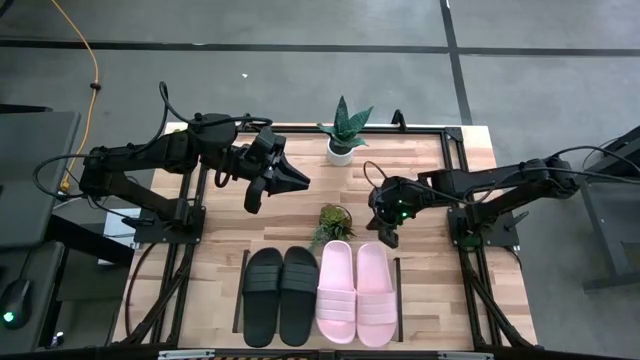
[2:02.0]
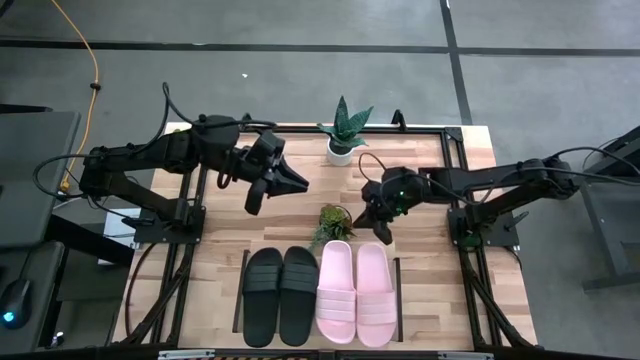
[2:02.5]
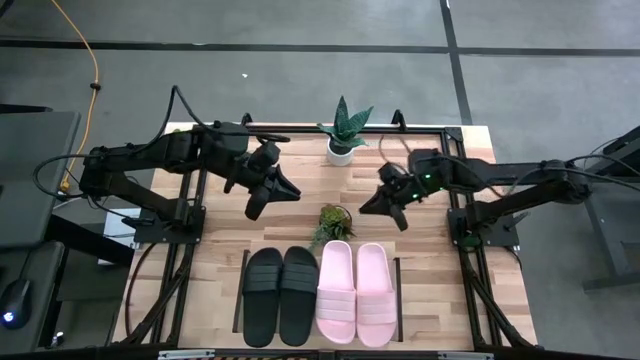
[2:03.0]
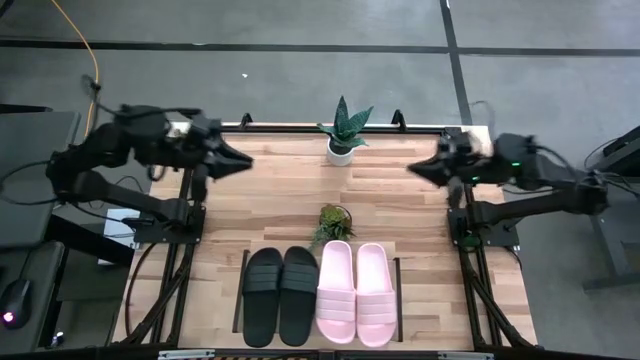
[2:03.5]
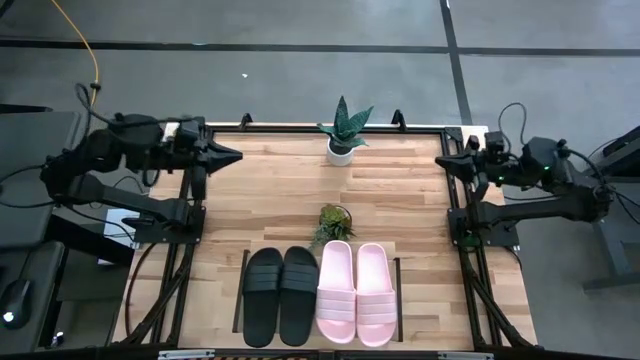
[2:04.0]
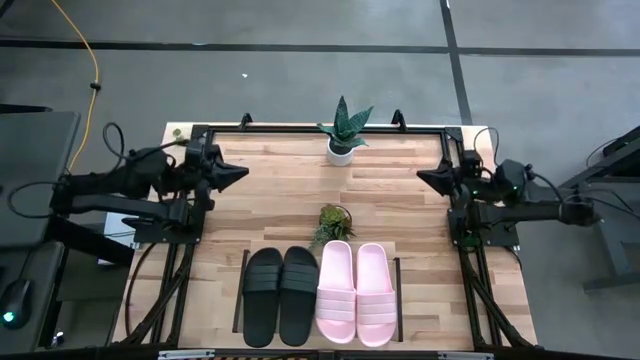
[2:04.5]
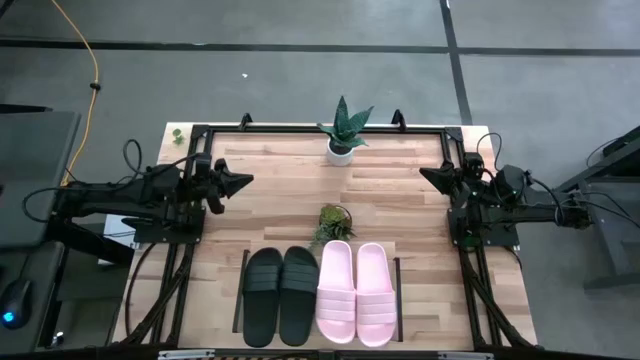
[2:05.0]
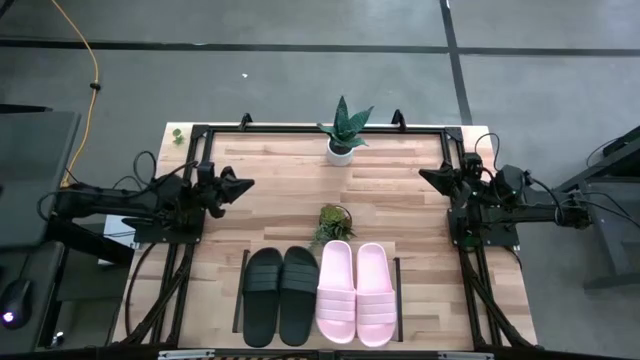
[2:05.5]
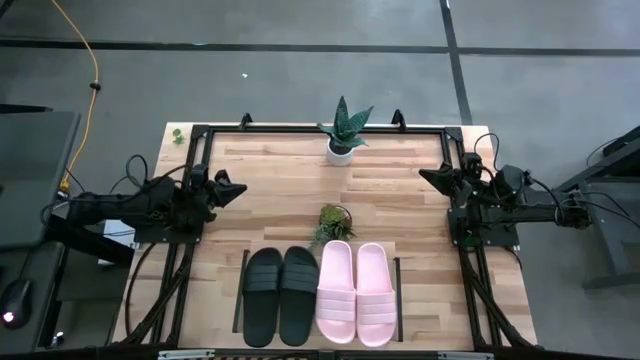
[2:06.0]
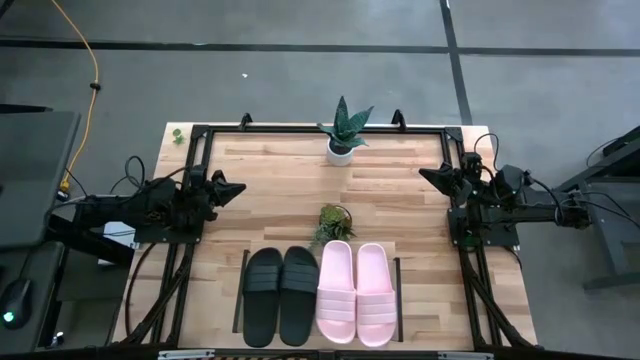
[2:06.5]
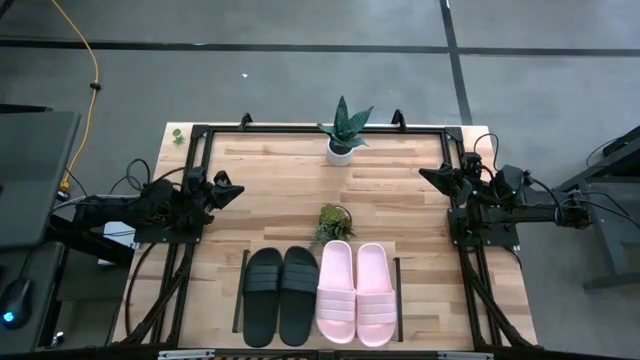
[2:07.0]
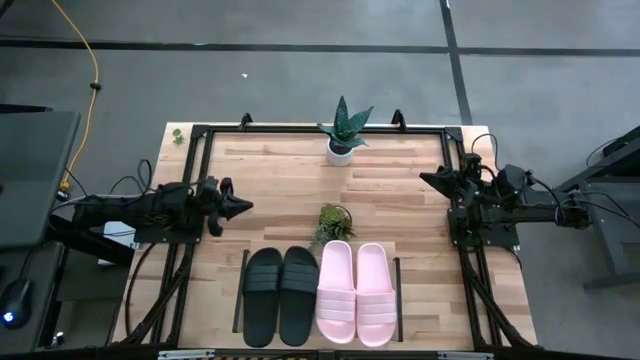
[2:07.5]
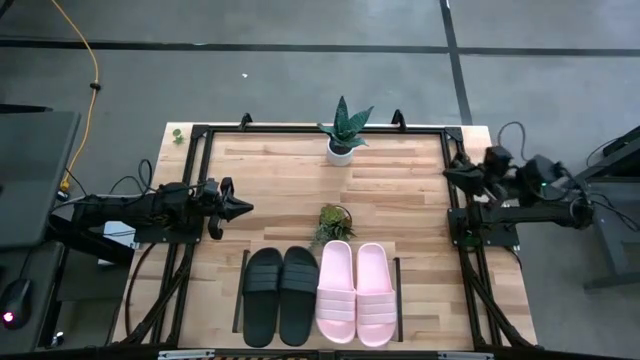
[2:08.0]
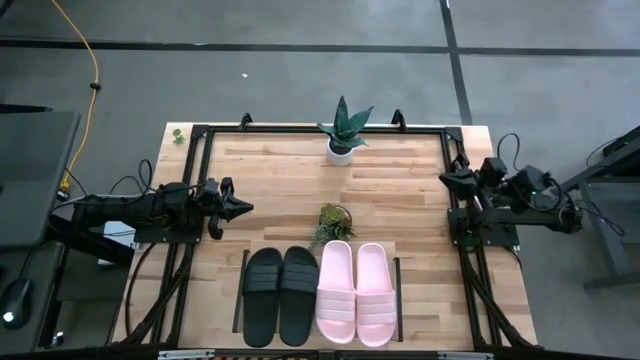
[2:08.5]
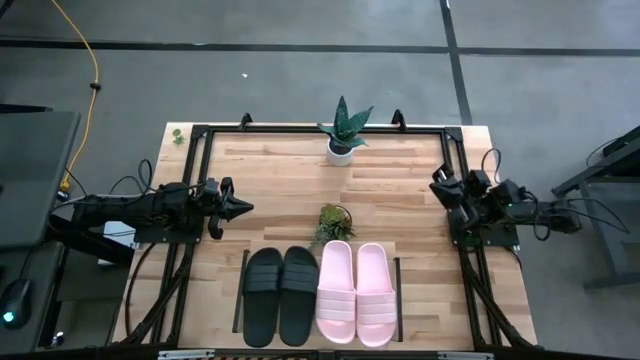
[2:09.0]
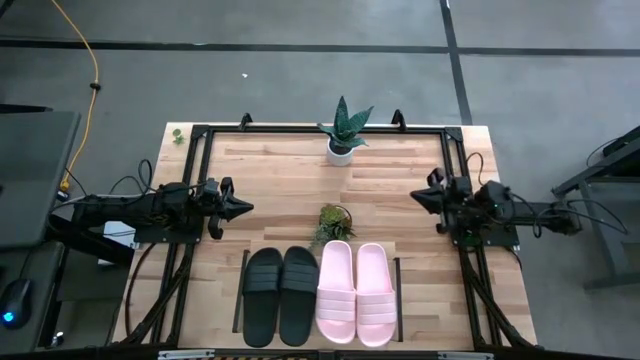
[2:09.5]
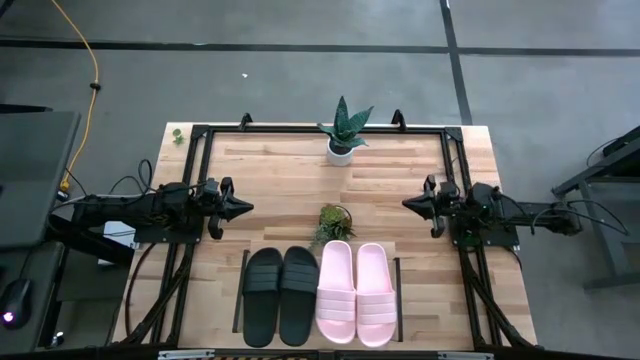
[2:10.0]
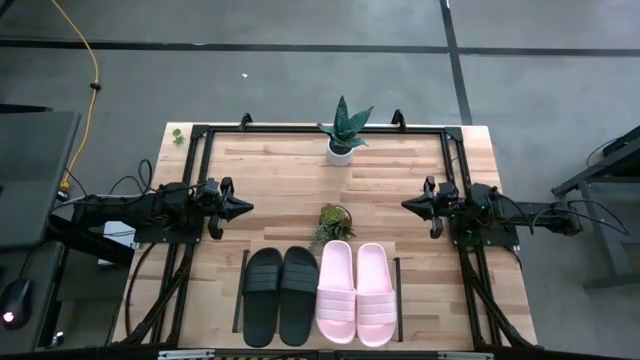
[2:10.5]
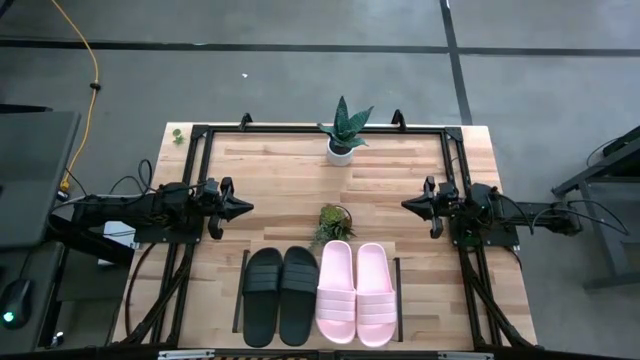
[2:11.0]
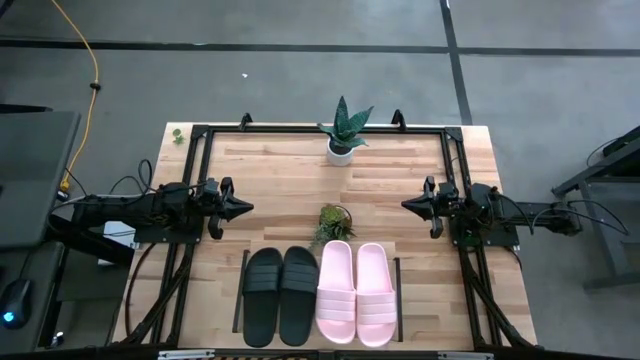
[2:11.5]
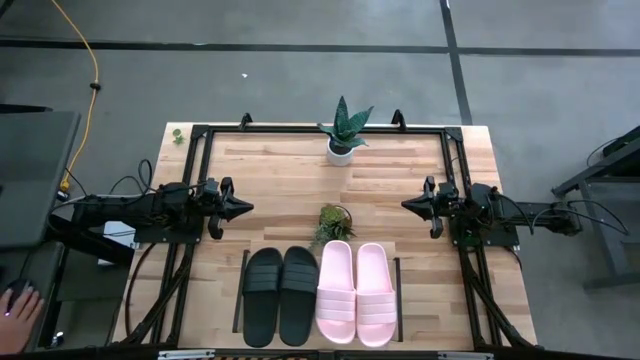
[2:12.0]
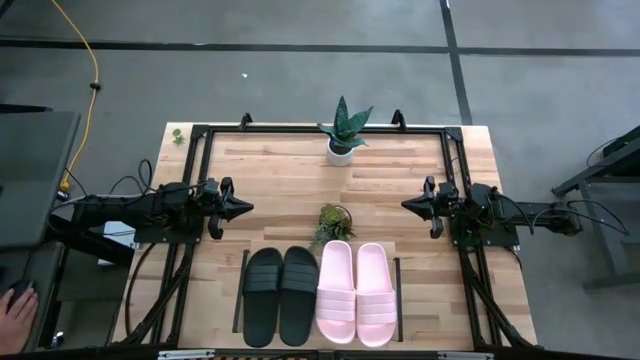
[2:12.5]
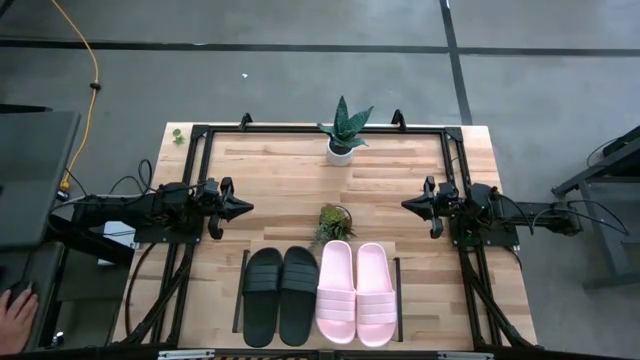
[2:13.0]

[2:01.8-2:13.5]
Task: Pick and place slides into the shelf
Return to Home Position

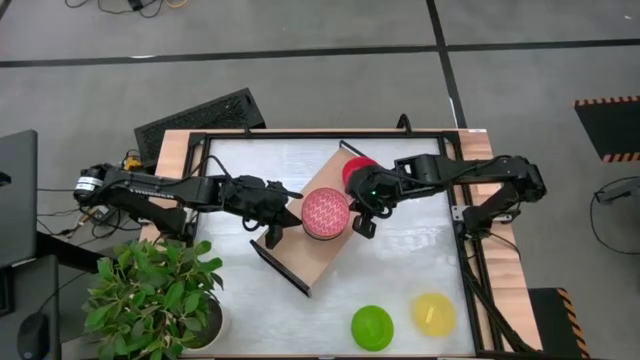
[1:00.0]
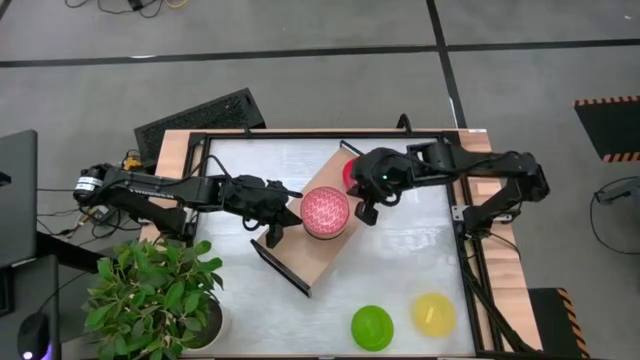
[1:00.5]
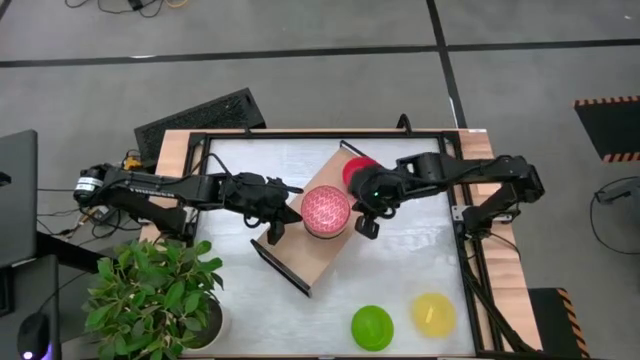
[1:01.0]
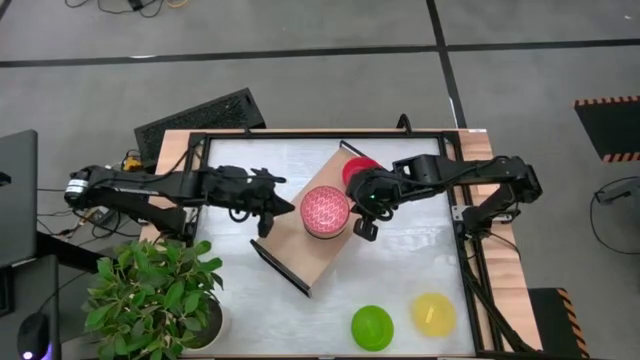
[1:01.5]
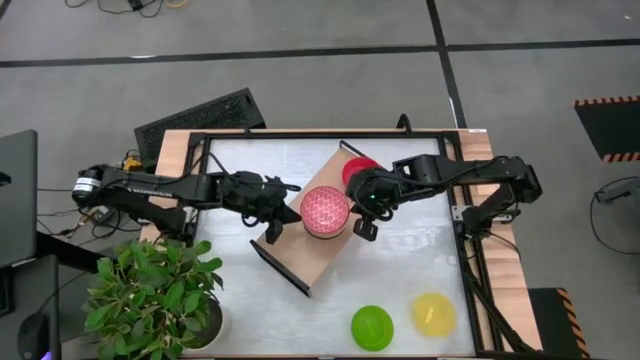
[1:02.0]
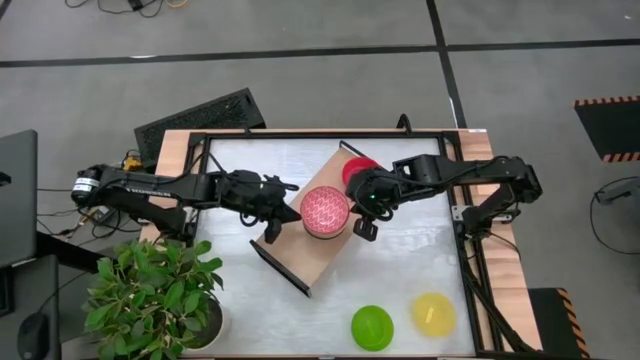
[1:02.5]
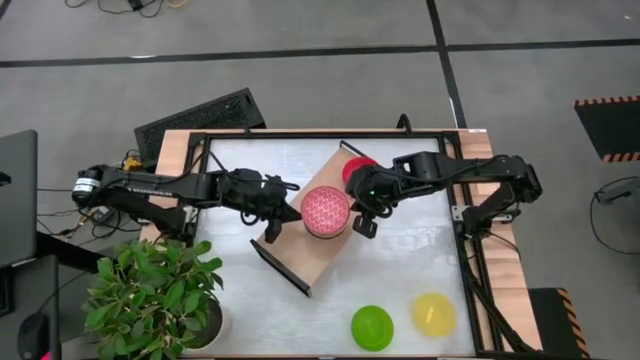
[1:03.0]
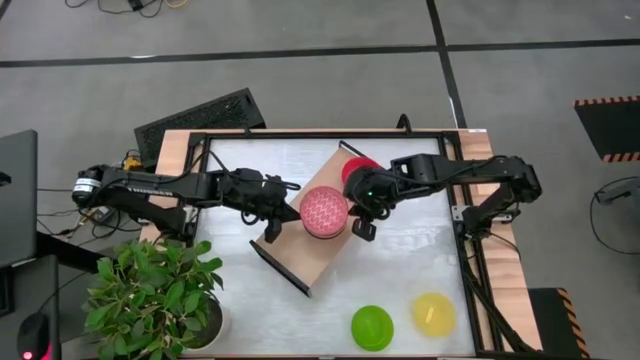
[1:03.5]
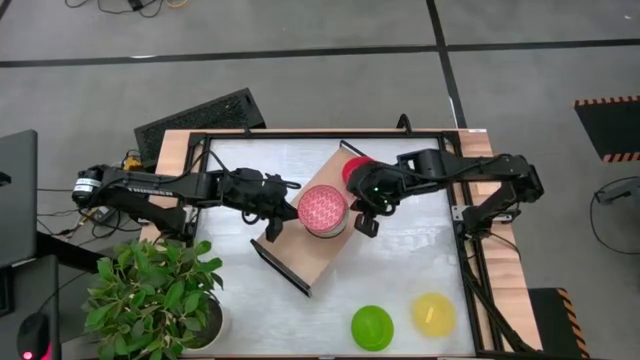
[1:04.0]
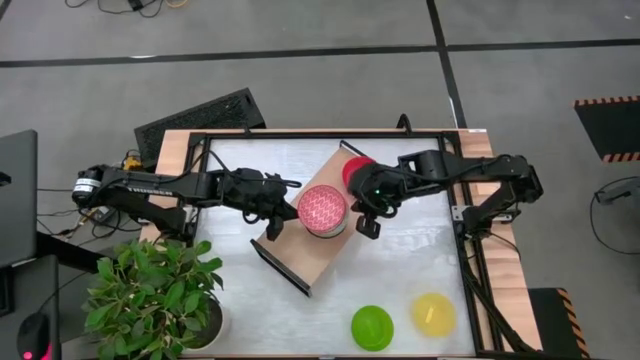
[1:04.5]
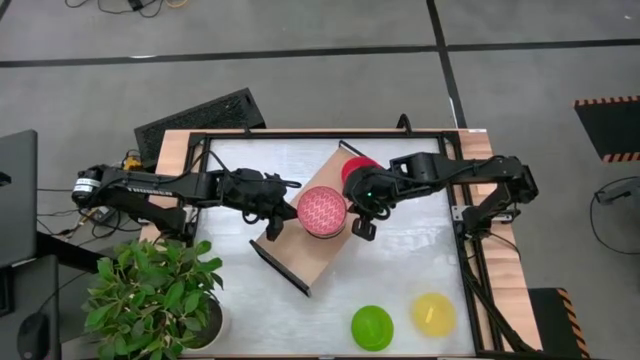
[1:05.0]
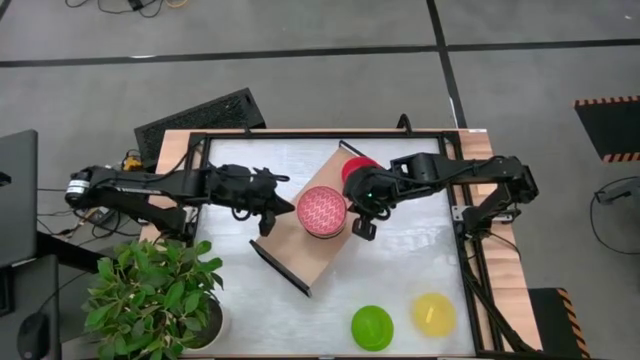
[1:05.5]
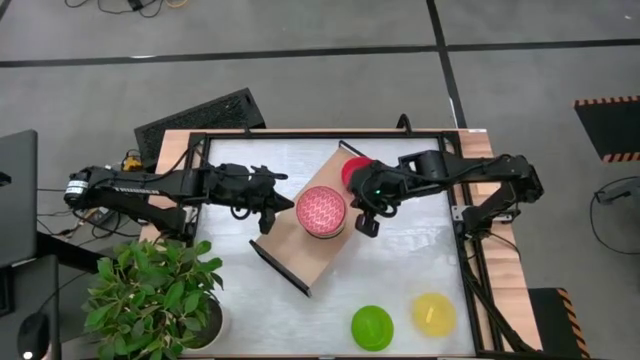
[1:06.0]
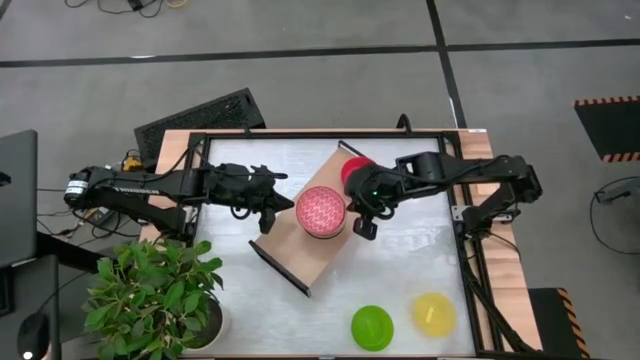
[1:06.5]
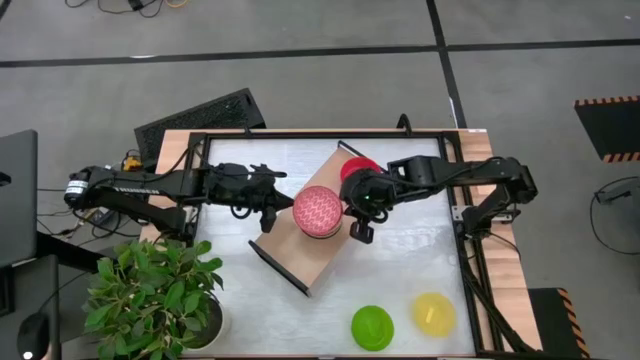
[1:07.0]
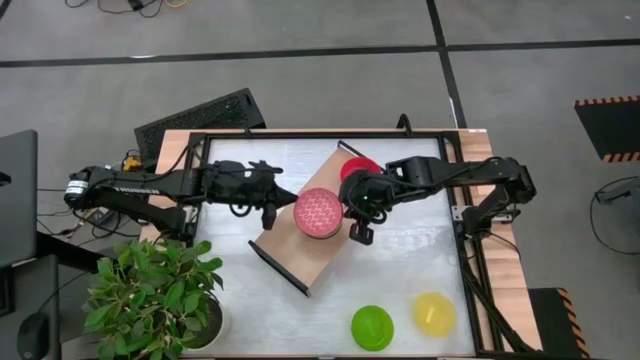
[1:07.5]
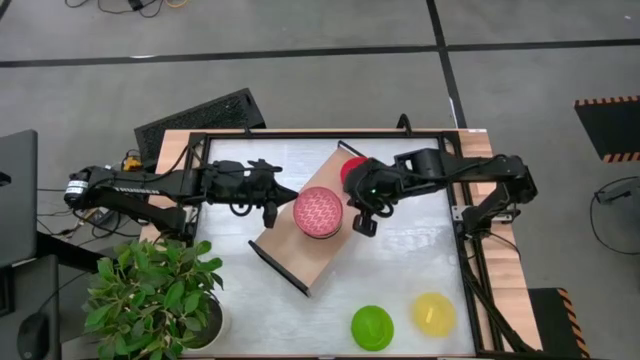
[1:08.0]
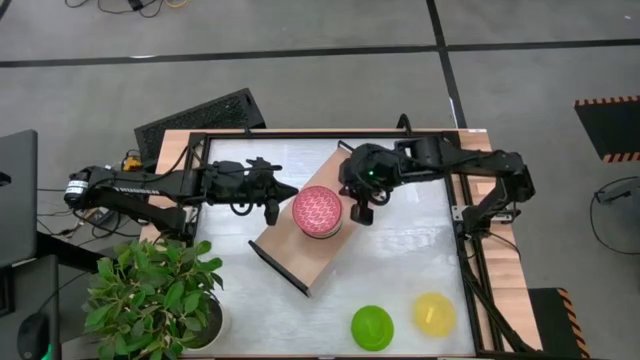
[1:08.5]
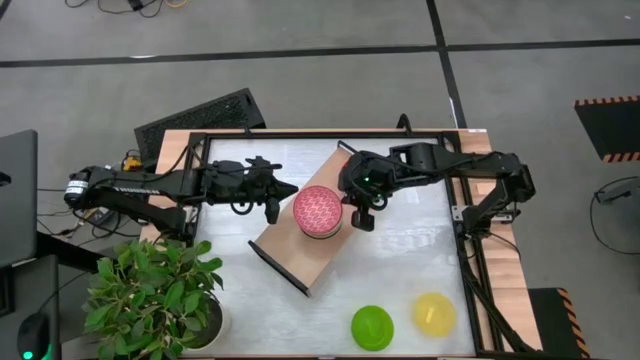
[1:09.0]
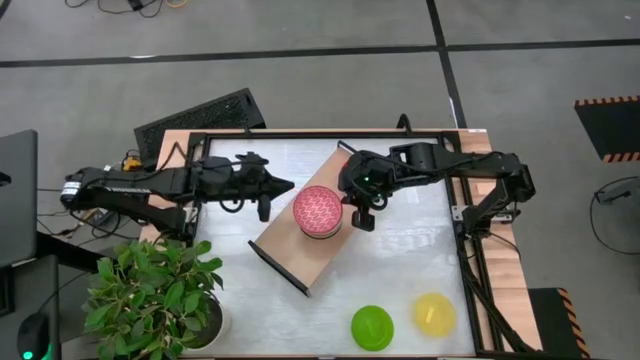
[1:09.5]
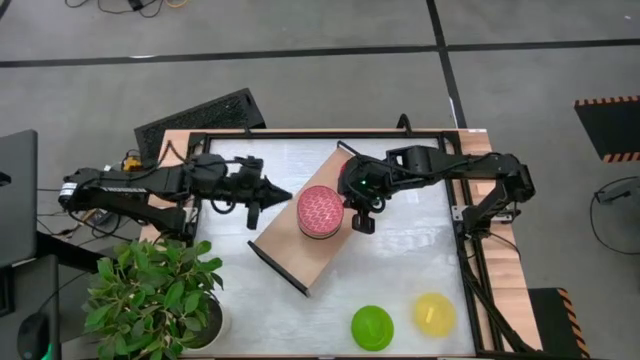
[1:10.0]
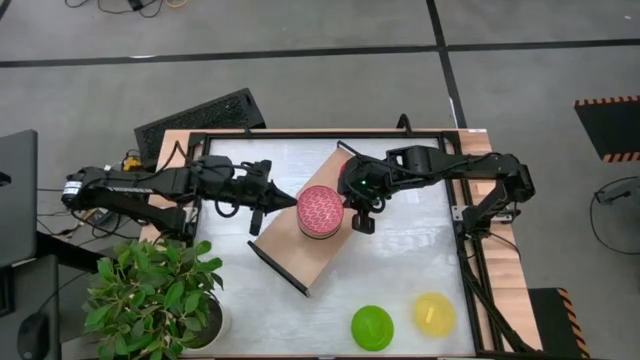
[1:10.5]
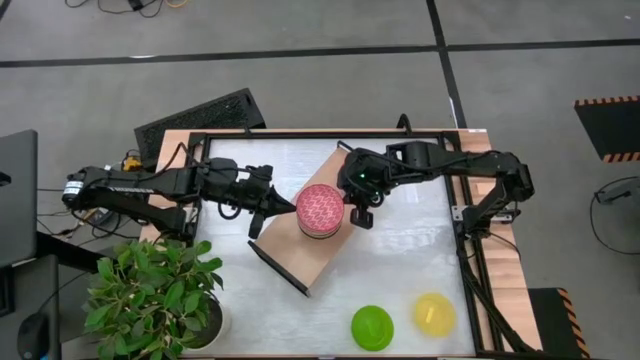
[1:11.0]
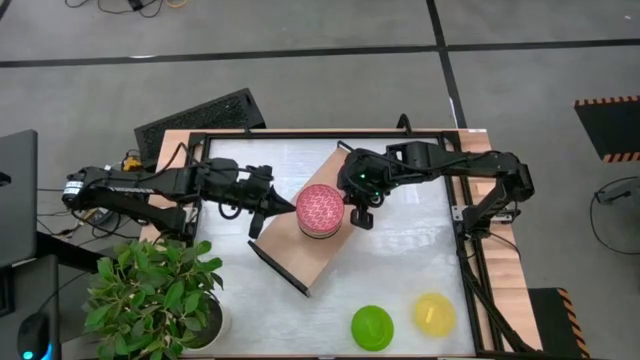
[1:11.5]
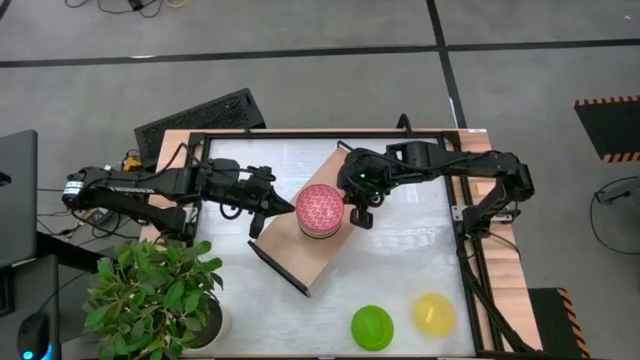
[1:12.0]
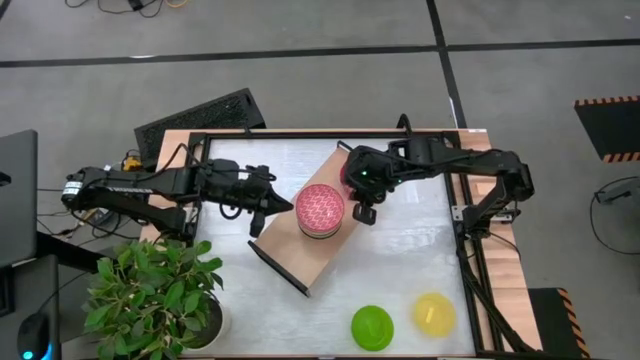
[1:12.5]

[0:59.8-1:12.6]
Task: Place and stack bowls onto a shelf
Adjust the stacked patterned bowls on the shelf
